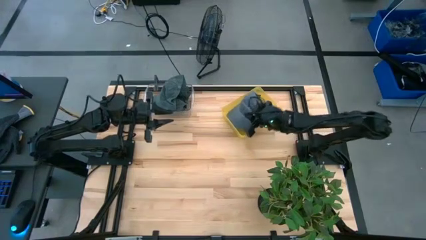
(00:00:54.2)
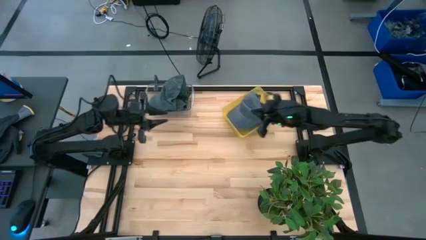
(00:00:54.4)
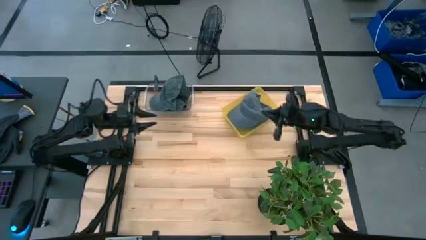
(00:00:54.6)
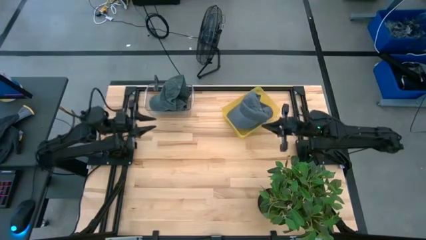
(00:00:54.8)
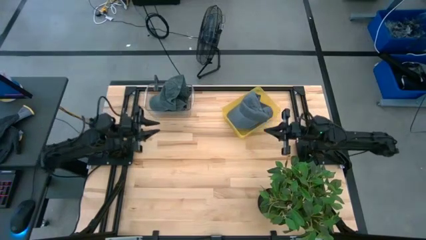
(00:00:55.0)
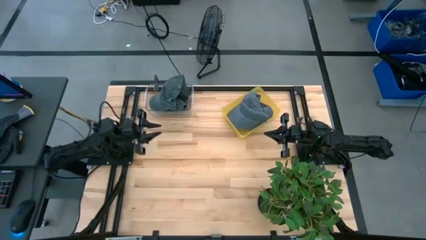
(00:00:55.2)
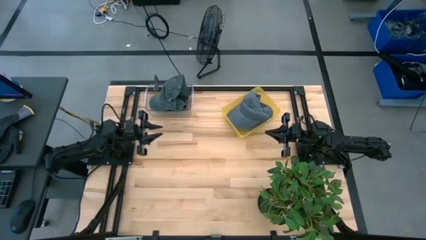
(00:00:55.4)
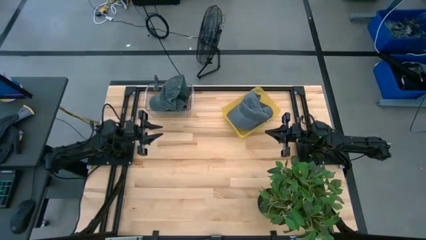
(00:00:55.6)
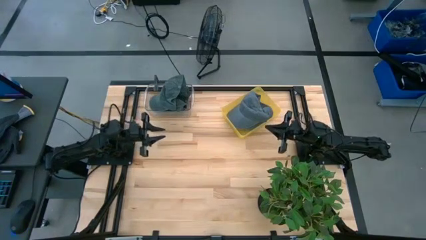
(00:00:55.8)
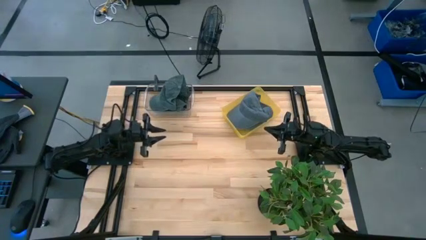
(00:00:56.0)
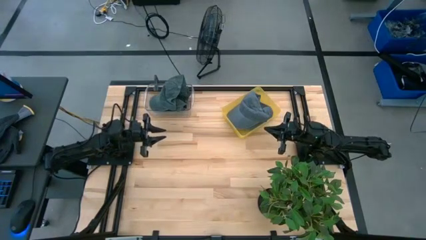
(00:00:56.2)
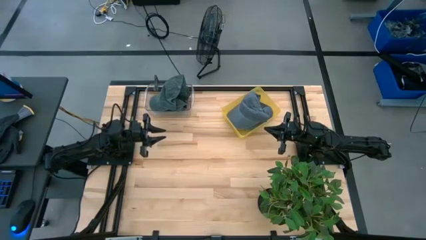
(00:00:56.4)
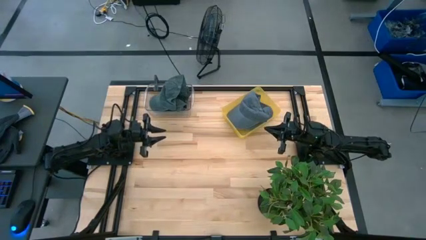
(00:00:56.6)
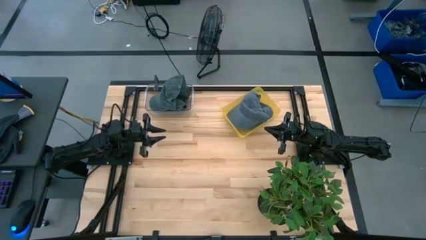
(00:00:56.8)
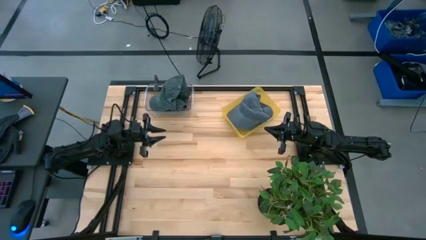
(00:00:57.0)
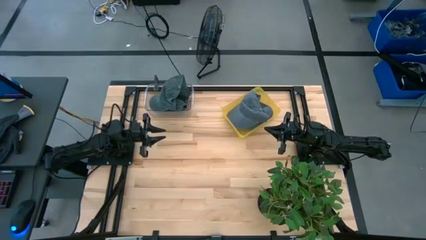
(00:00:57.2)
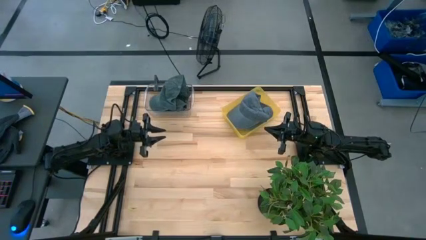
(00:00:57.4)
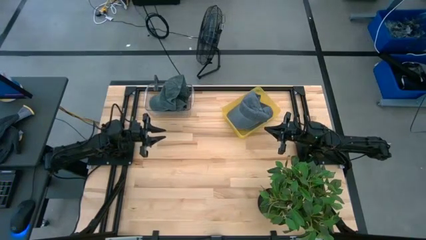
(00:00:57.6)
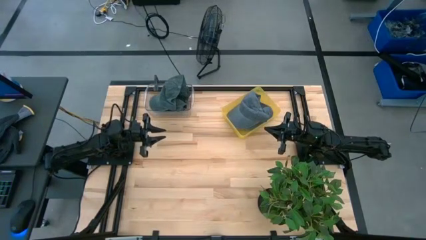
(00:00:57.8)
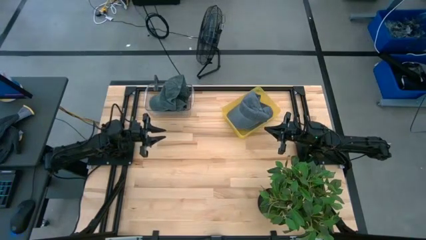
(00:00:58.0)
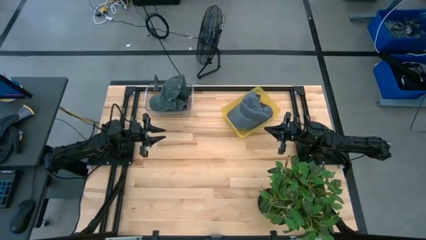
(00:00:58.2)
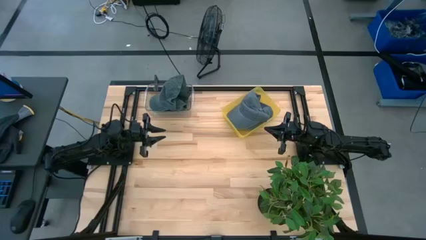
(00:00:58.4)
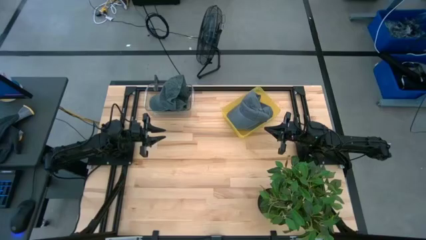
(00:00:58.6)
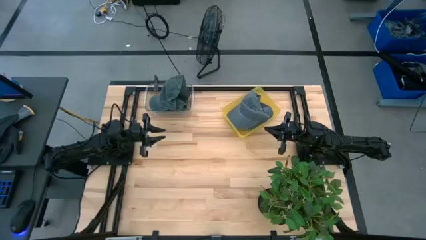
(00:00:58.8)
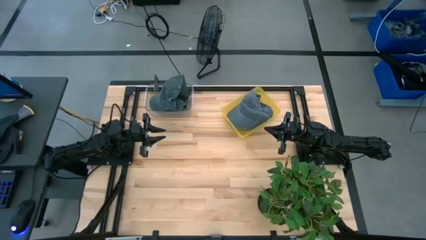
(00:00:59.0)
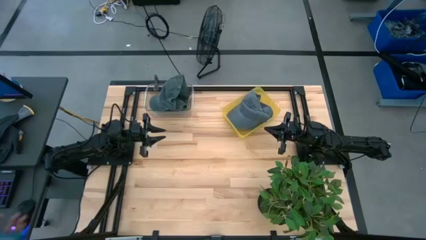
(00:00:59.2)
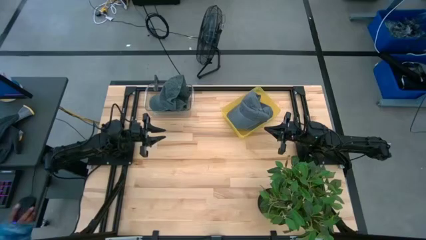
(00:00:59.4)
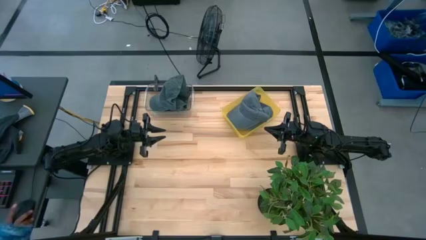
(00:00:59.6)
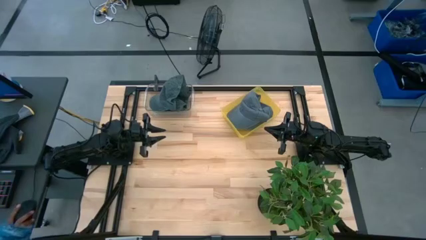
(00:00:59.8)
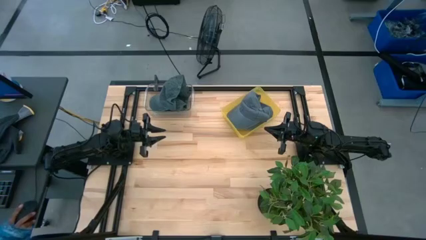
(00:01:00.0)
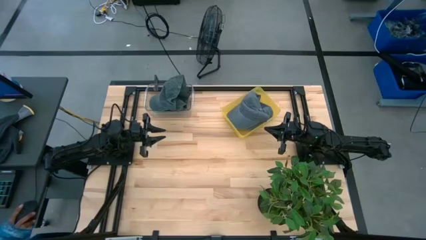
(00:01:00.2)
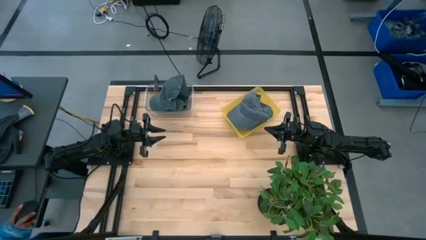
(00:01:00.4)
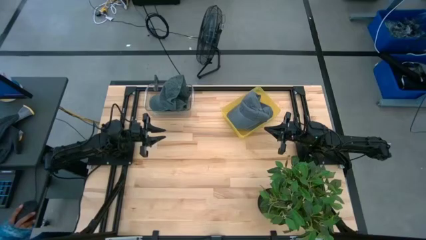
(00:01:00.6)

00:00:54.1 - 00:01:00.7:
Task: Pick & Place hat
Return to Home Position

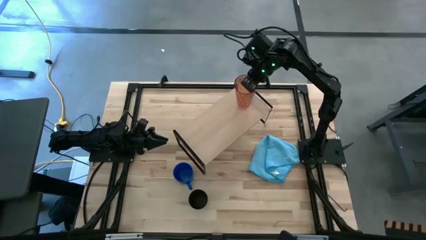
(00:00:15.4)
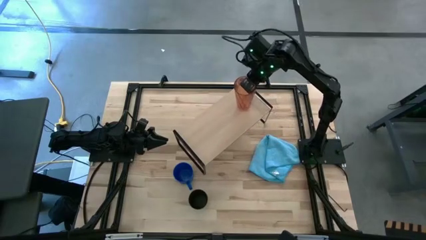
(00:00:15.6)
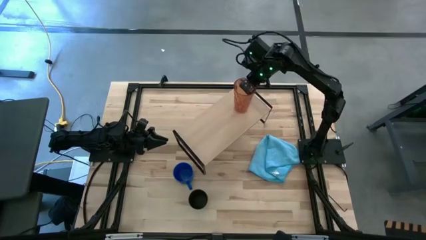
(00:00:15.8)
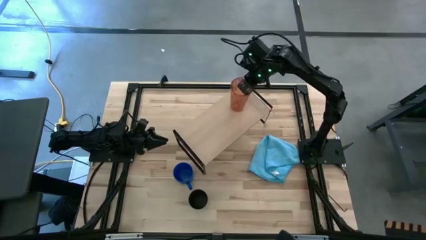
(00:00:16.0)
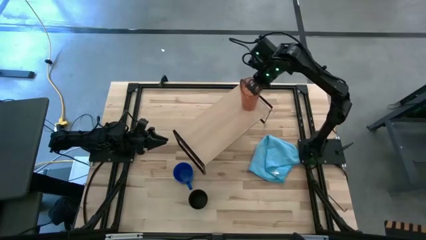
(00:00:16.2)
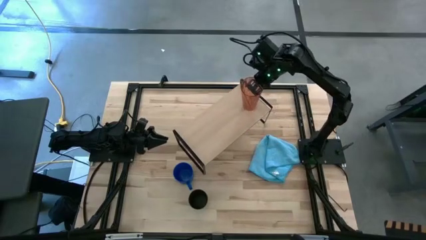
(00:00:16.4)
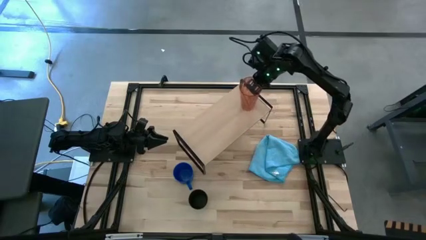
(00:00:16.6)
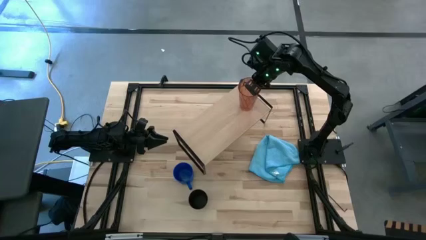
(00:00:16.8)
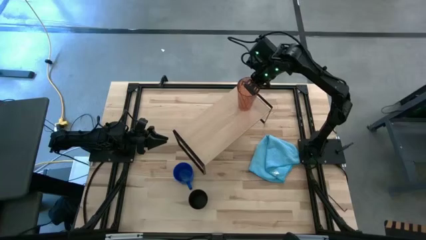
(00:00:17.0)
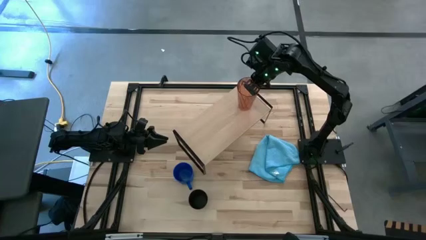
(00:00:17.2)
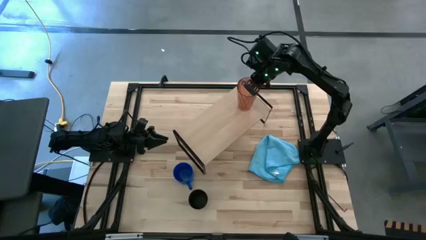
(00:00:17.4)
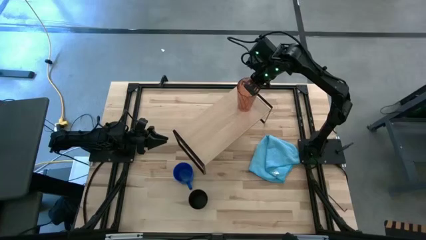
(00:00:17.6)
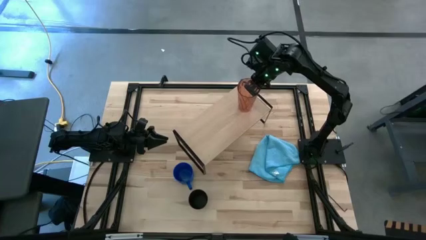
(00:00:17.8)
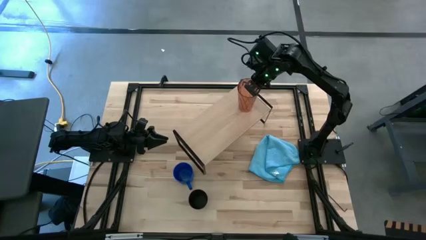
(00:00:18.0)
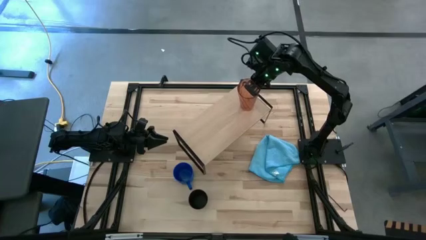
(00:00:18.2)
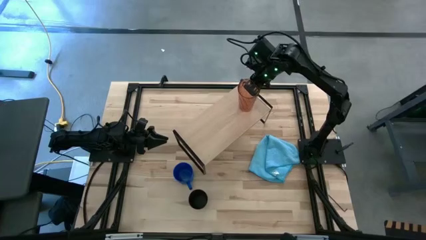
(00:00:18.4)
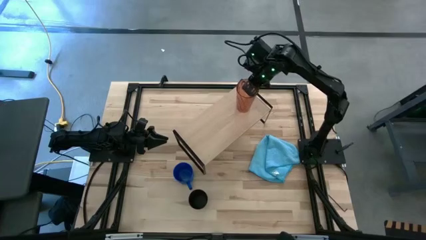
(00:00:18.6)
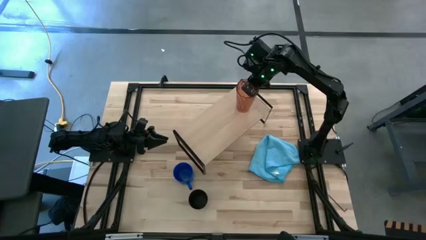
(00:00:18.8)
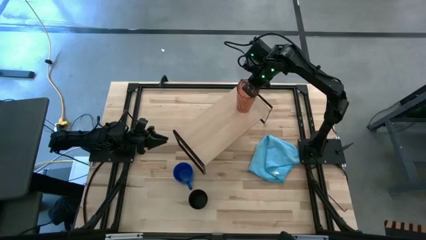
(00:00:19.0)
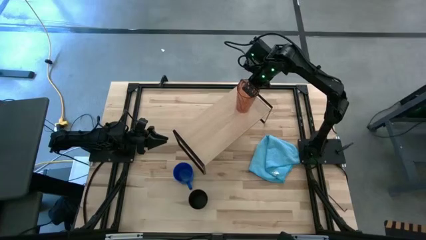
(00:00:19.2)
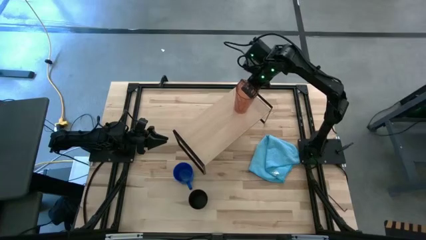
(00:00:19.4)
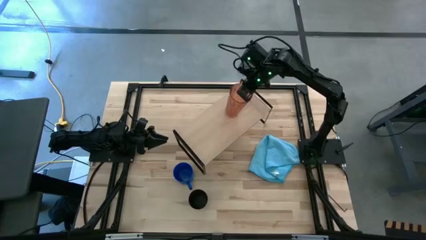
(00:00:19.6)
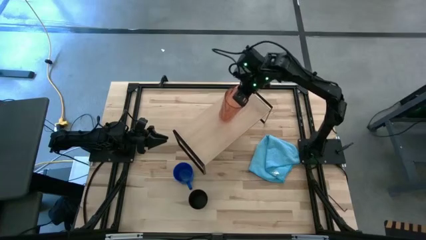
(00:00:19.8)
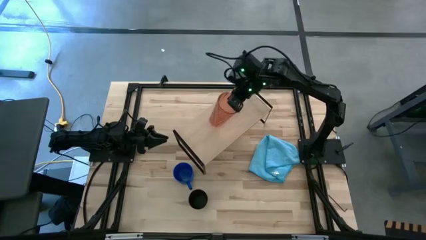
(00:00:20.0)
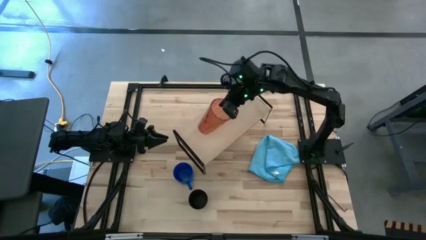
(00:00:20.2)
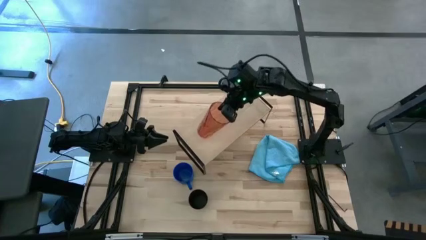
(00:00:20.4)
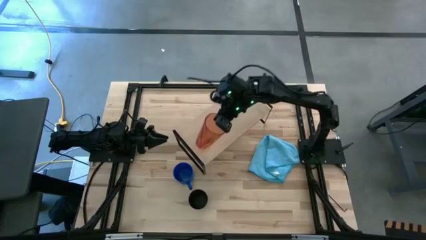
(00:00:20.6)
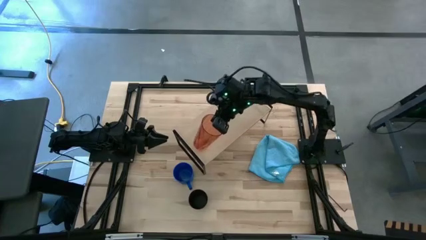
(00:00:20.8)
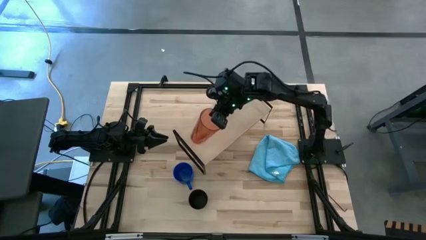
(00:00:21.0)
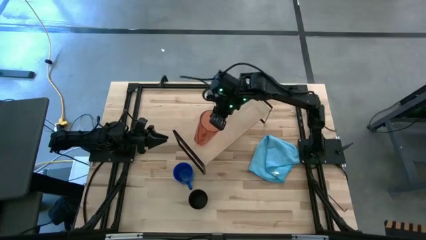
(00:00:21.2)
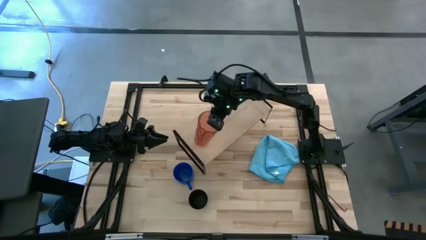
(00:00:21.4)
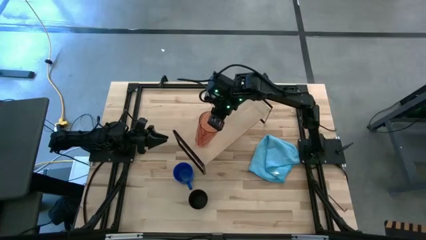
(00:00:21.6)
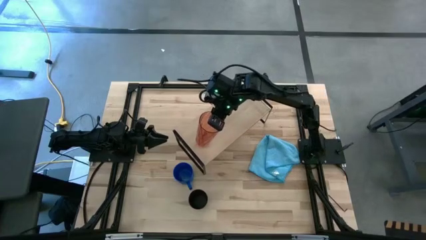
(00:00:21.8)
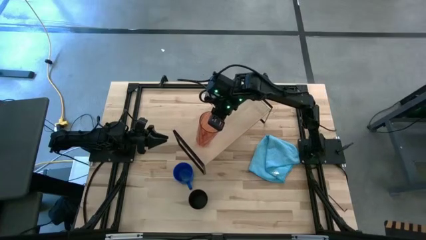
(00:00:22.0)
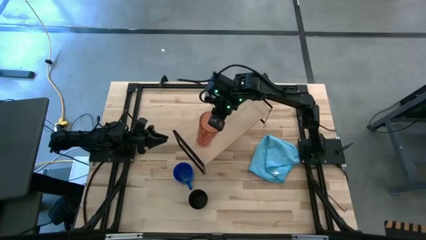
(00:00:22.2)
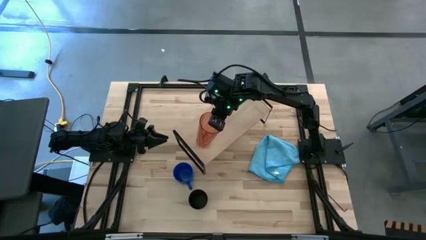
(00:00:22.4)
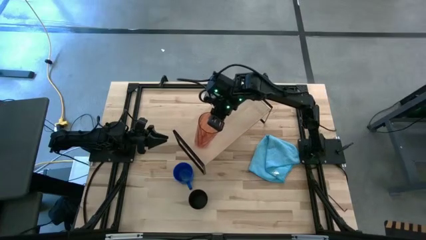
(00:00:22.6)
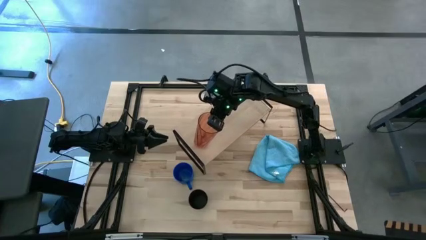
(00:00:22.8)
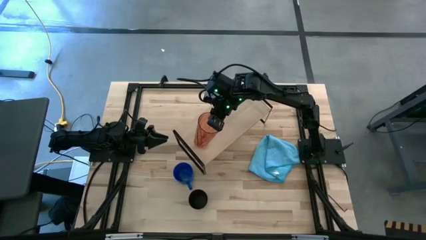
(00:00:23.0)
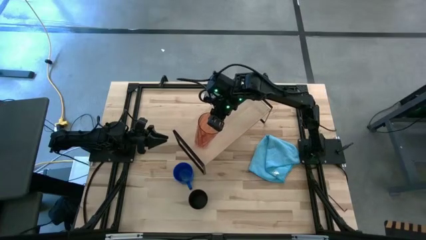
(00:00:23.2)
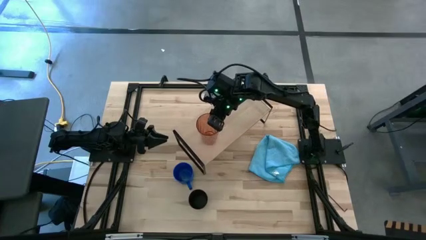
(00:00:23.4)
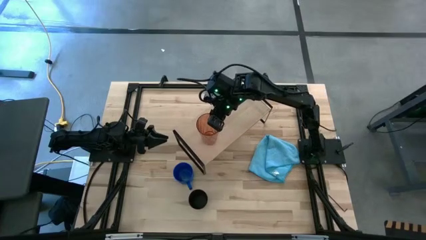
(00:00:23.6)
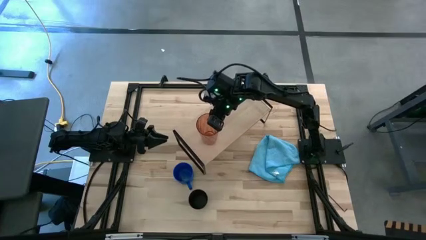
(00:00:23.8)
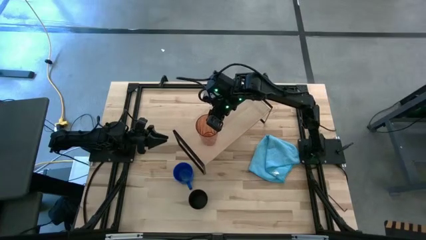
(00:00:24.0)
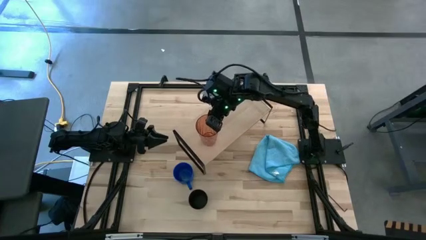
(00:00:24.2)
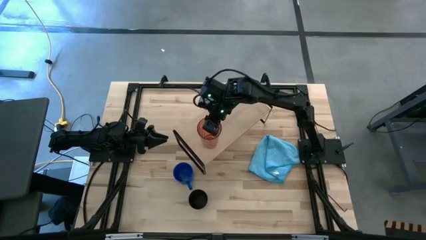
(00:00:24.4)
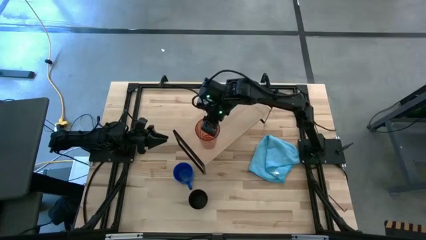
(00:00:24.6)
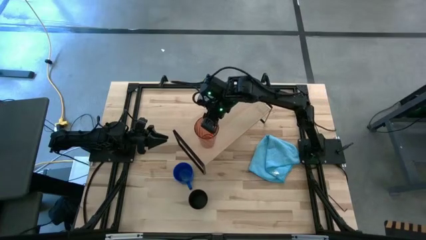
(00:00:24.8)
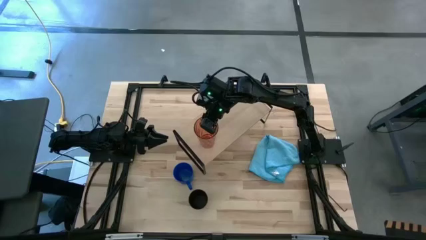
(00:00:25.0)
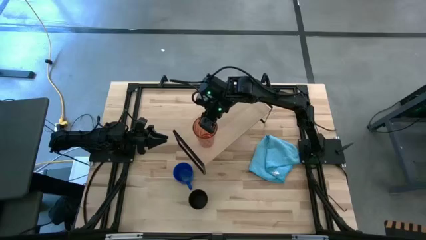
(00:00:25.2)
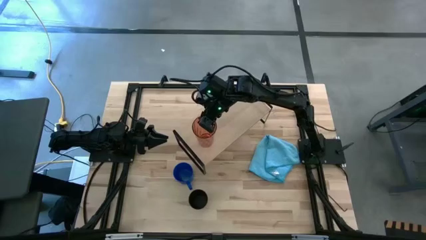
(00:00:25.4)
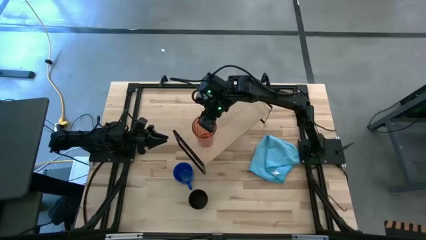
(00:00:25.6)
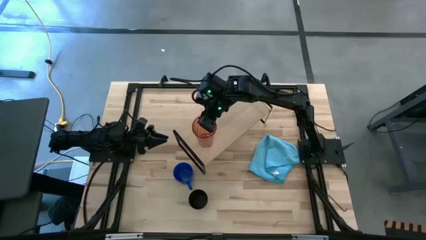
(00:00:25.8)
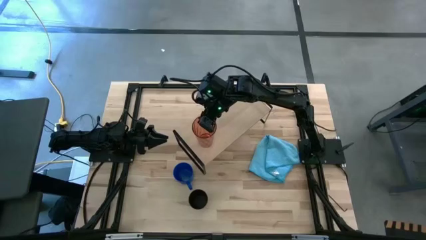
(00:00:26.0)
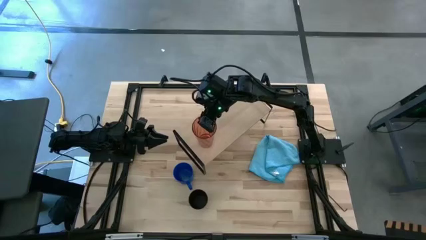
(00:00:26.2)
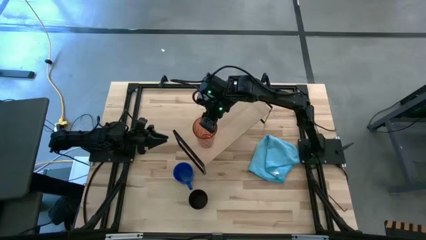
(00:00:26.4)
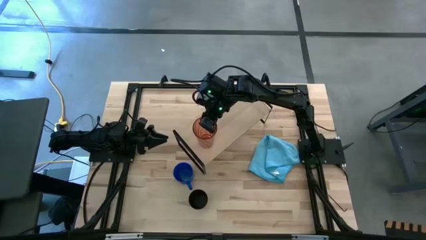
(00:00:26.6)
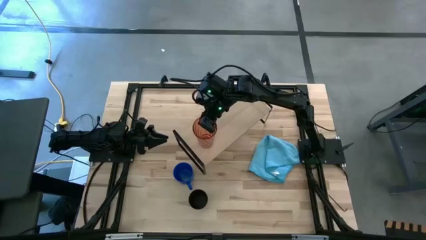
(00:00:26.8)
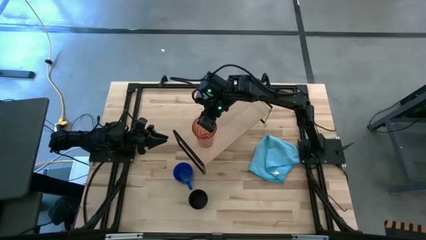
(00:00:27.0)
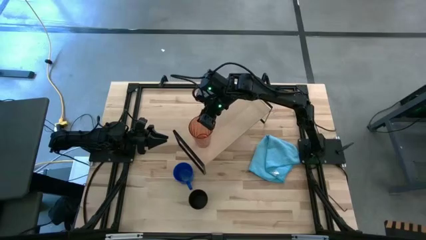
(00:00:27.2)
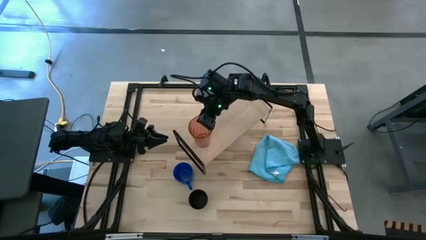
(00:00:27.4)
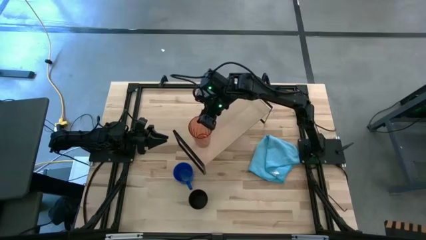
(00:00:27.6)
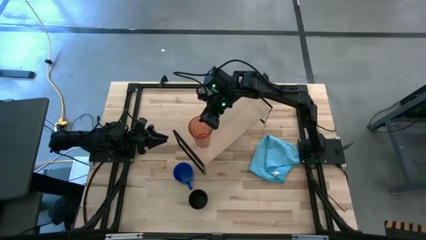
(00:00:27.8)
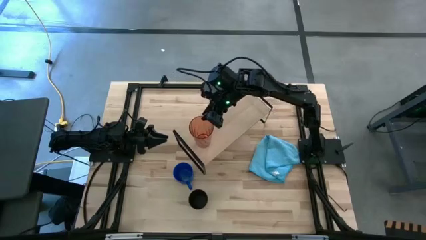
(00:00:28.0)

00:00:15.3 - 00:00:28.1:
Task: Stack small to large cups/mugs on shelf
Put the orange glass on the shelf
